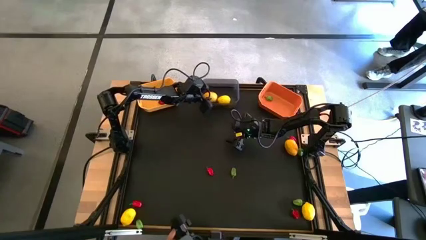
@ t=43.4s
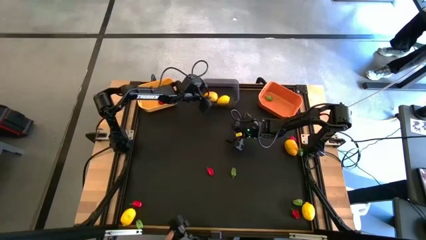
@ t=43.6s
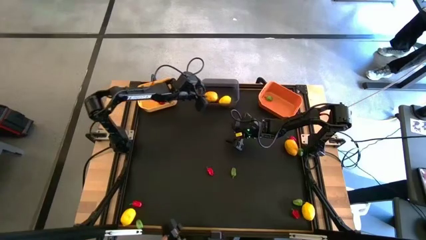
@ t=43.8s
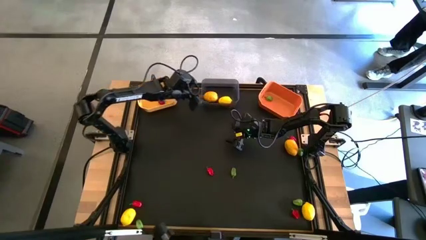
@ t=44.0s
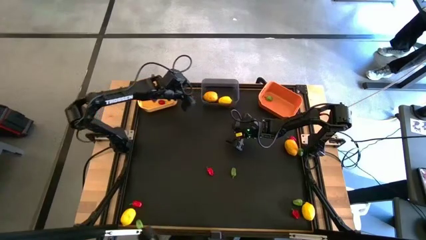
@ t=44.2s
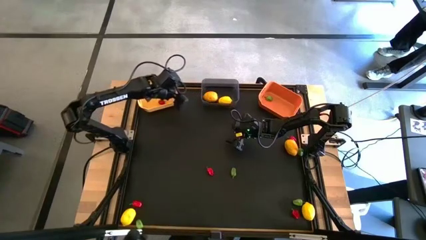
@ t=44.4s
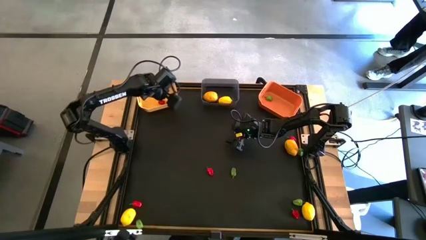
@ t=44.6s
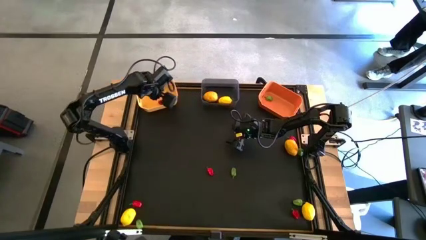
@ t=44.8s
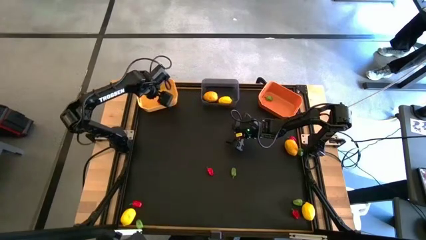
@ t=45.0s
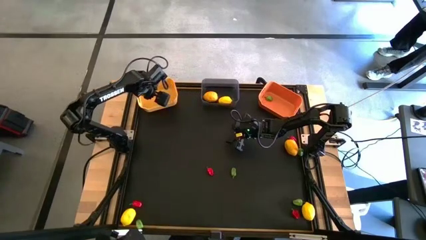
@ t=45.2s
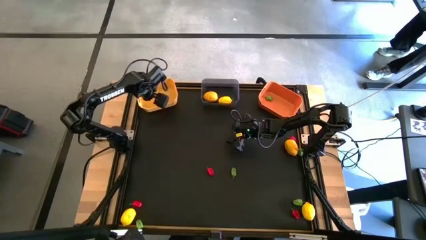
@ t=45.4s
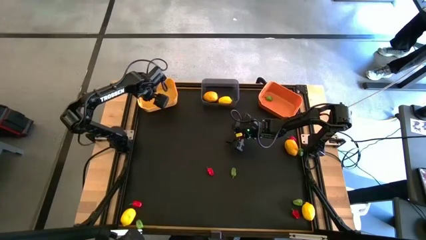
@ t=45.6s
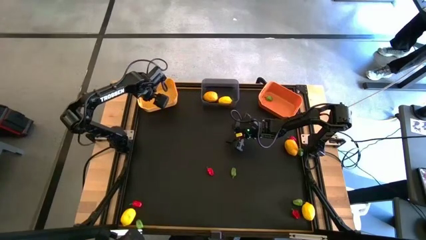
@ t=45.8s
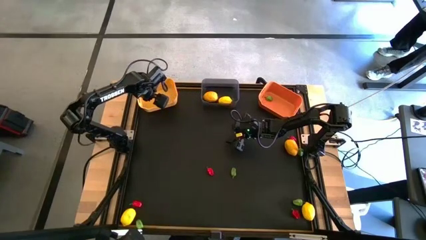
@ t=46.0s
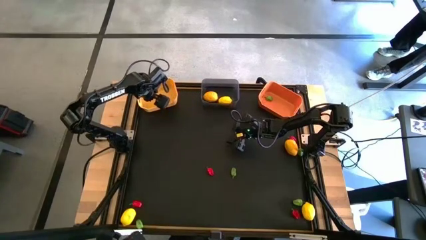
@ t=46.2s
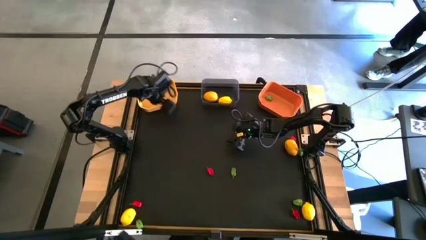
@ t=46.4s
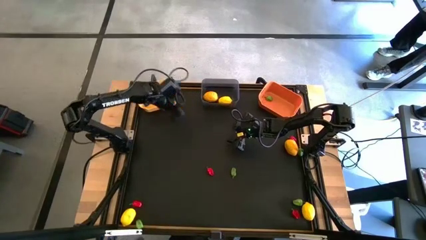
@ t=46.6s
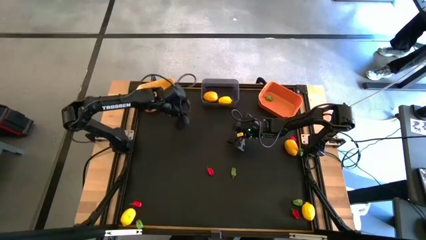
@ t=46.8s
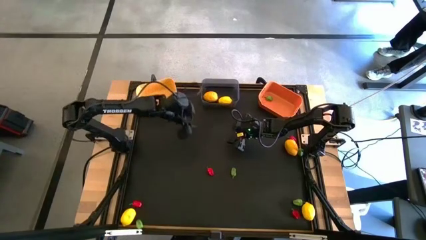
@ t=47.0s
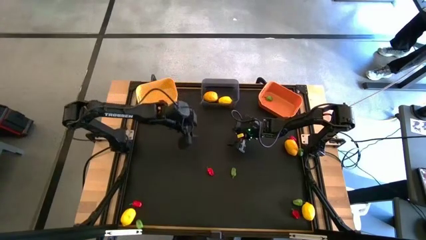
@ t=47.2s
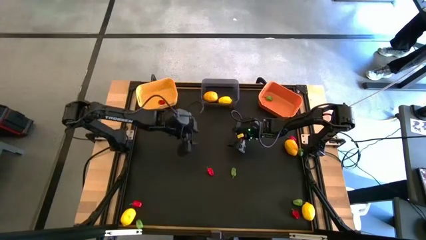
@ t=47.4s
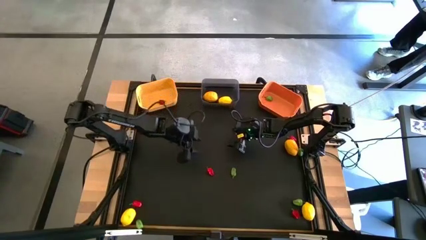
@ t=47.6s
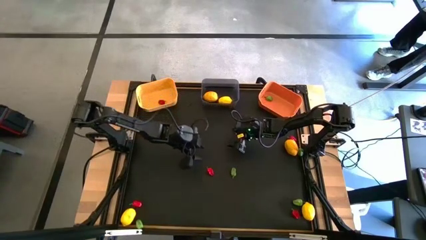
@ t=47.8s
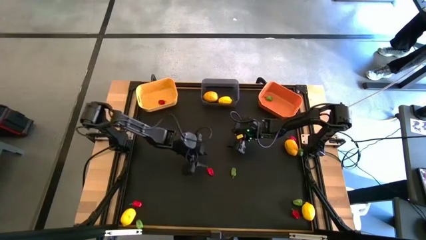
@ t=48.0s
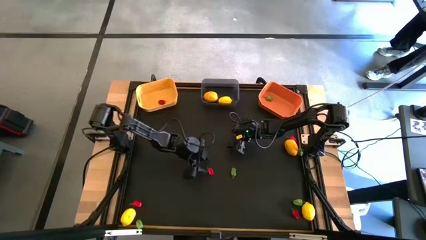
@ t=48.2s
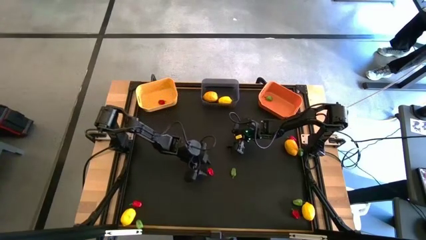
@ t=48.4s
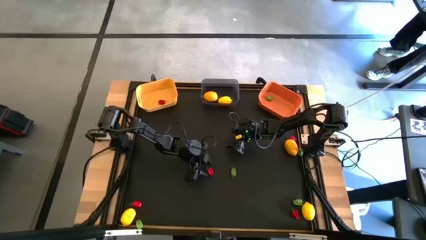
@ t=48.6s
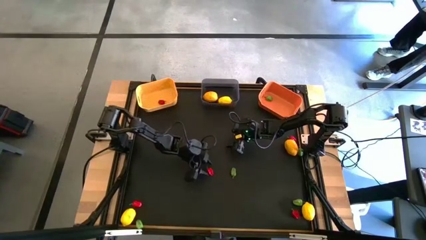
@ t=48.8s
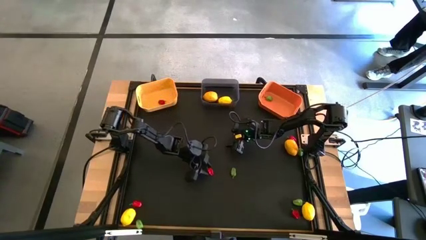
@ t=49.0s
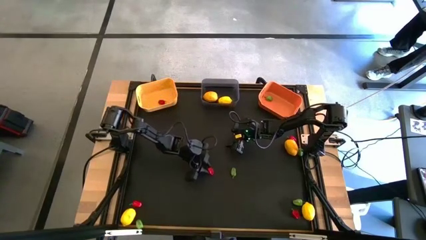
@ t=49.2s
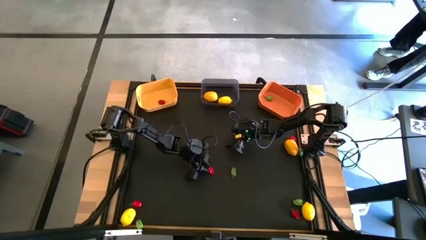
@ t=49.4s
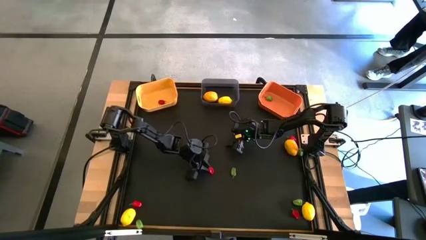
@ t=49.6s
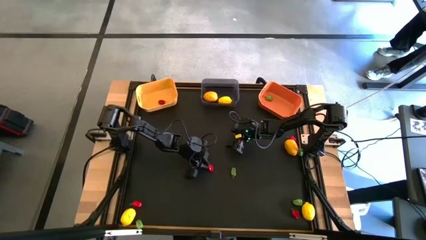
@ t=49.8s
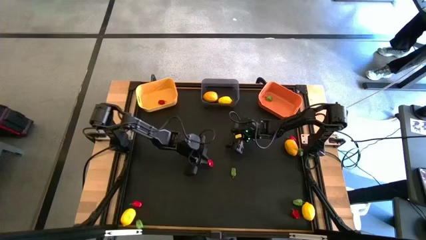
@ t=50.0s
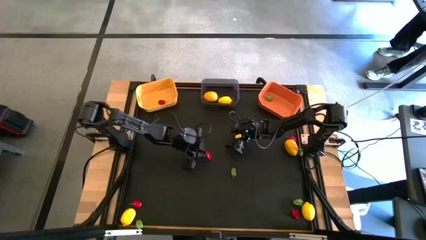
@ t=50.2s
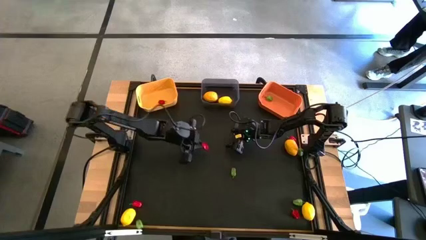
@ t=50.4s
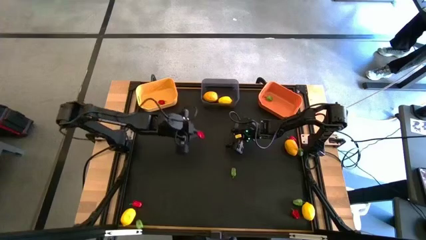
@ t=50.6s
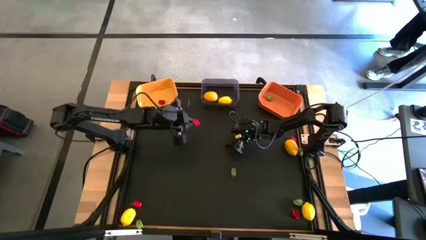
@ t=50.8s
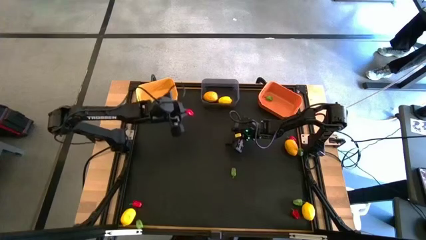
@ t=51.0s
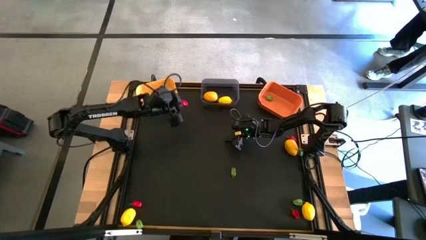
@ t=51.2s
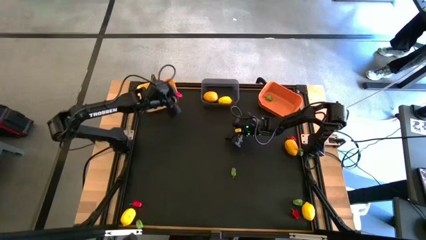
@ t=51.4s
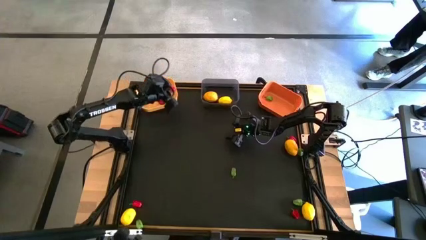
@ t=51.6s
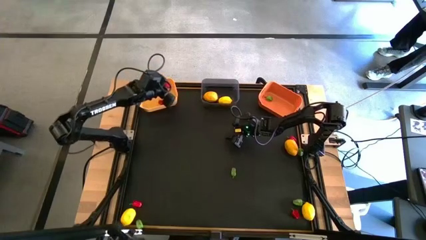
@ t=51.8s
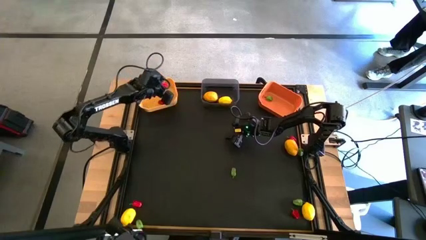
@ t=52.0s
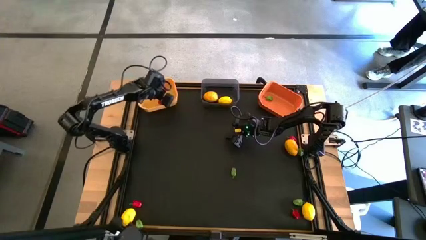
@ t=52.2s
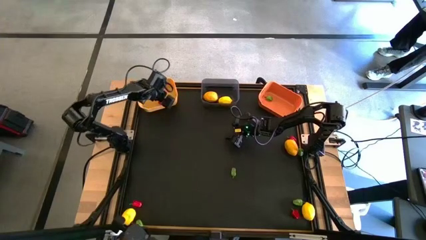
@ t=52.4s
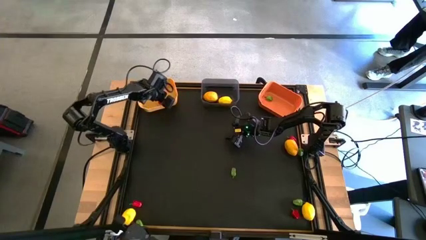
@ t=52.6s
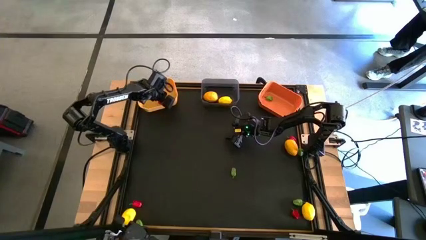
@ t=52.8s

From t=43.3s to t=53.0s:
Task: Sort produce into baskets
Put the red chili pepper into the yellow bin

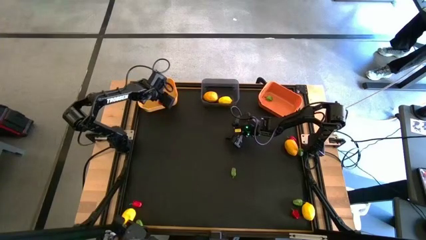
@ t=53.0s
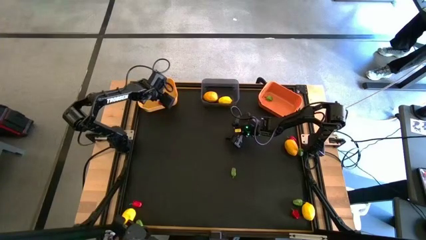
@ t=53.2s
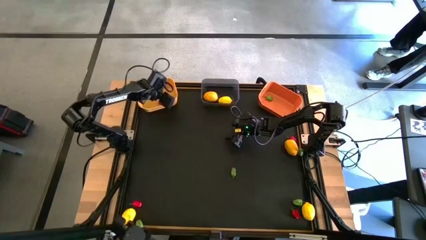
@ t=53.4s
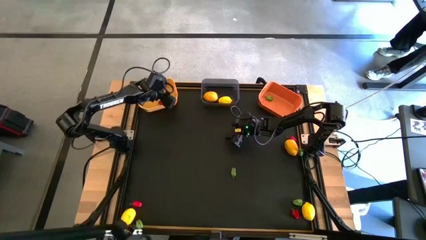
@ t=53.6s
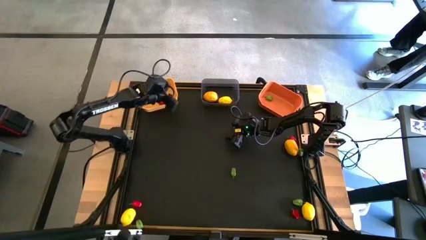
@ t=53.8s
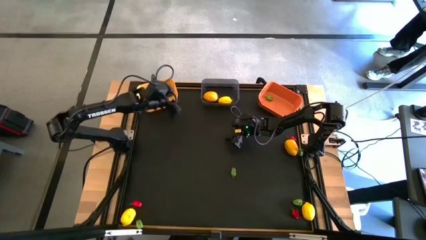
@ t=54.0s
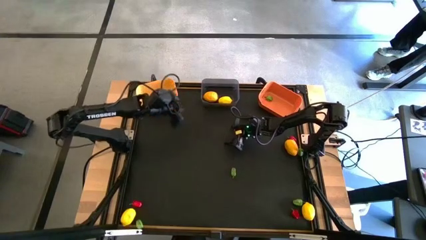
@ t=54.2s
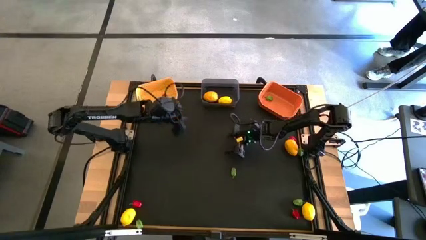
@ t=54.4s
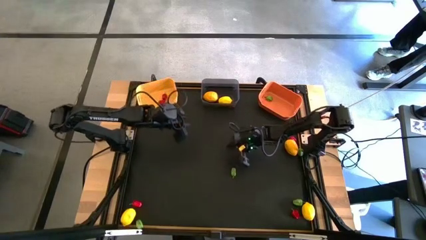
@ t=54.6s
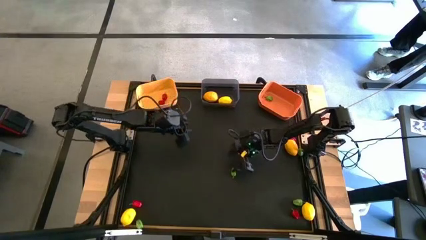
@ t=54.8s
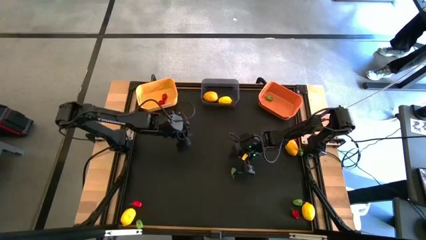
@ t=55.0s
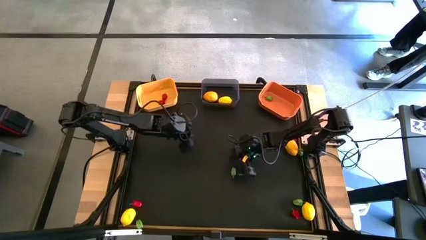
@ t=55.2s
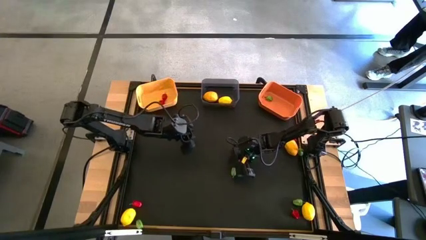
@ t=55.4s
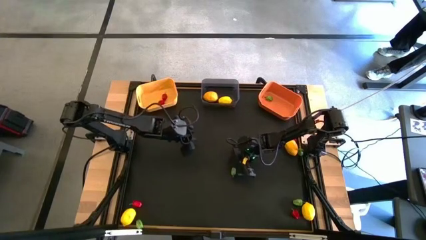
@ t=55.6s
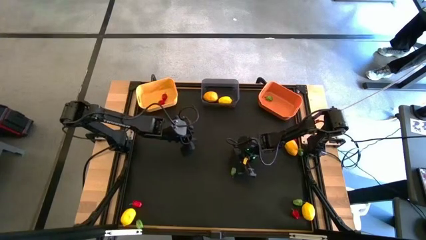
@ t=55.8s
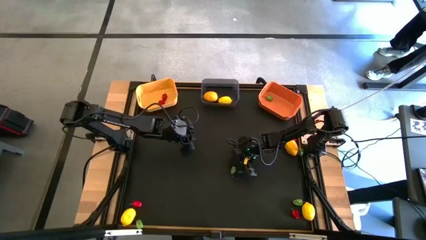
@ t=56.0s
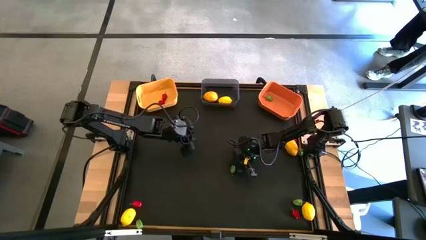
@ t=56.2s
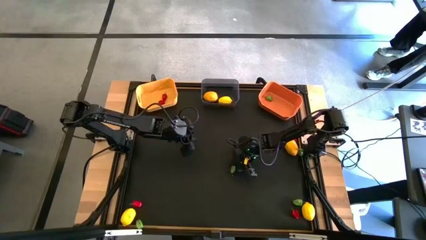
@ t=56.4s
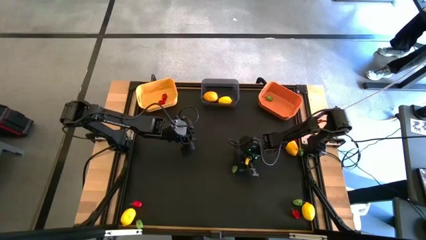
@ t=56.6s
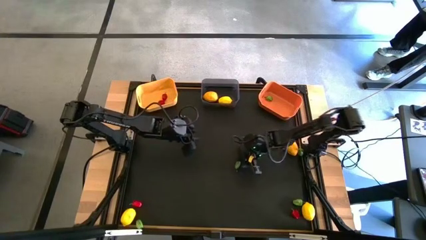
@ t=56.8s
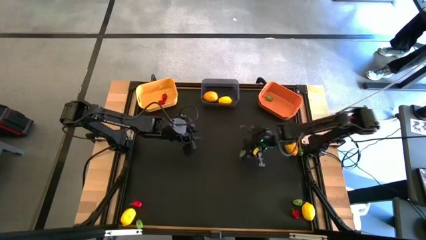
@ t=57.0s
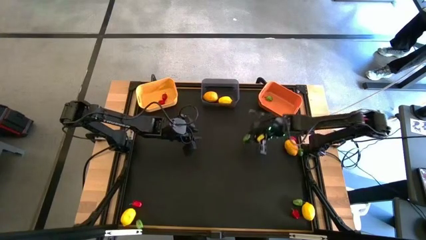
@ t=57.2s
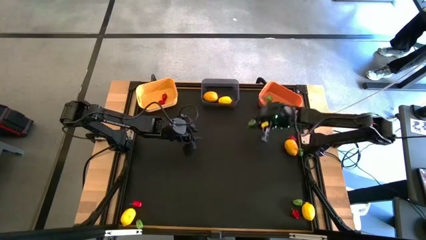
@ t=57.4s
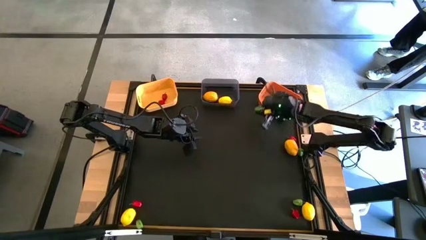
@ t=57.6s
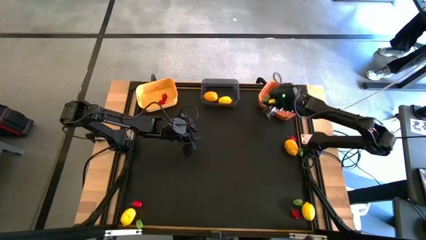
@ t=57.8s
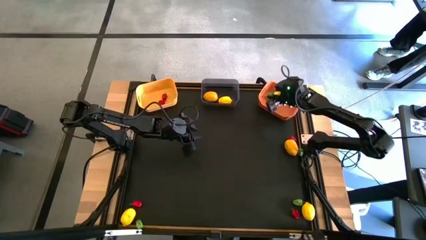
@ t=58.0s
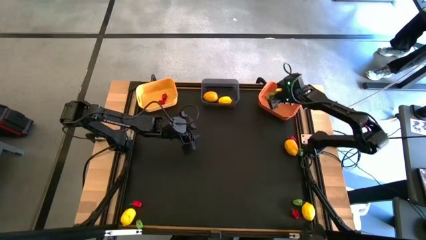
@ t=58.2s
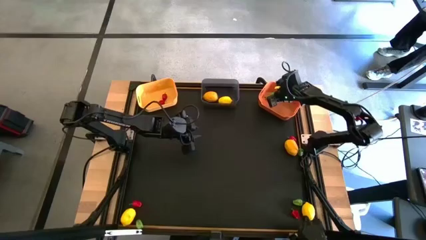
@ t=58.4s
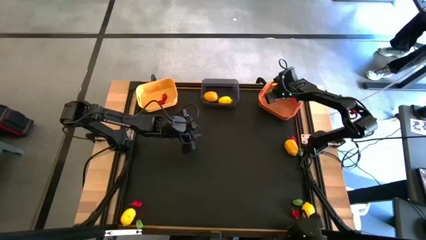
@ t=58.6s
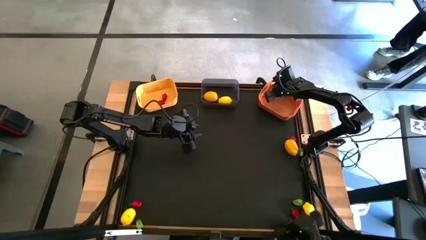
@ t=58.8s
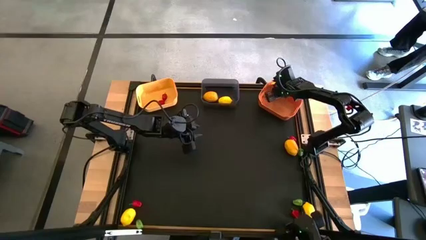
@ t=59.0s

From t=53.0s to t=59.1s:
Put the green chili pepper into the orange bin
